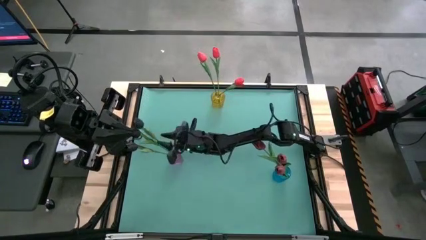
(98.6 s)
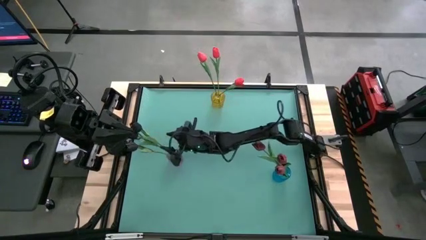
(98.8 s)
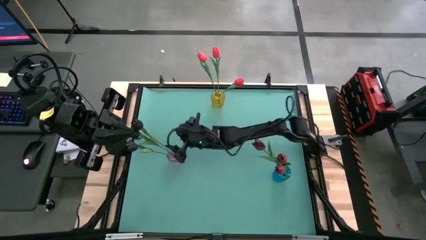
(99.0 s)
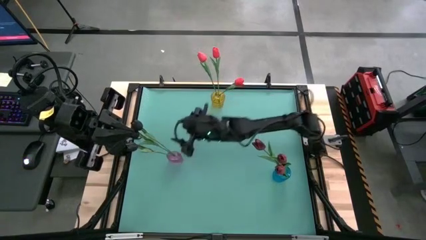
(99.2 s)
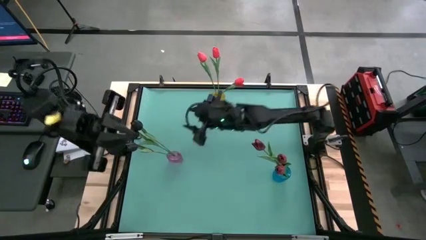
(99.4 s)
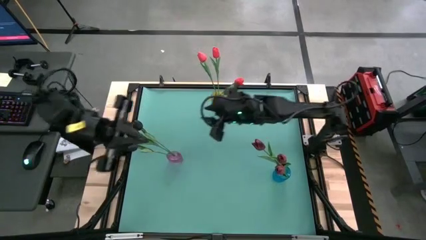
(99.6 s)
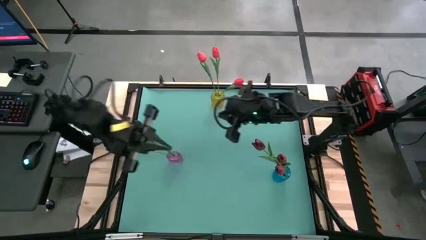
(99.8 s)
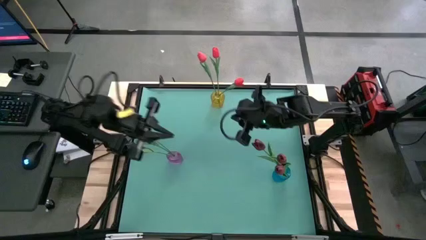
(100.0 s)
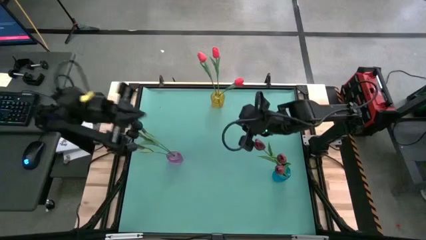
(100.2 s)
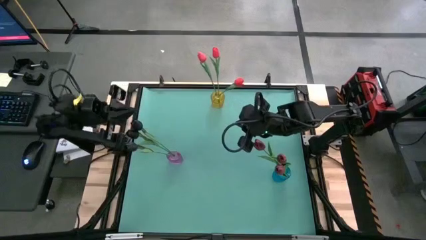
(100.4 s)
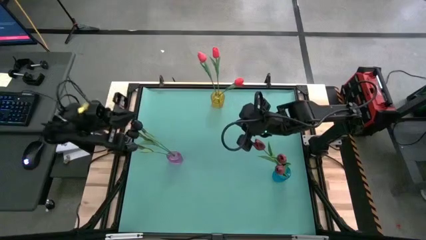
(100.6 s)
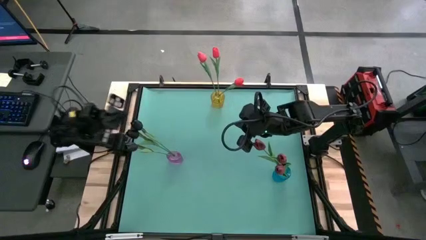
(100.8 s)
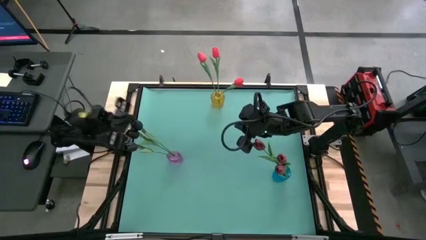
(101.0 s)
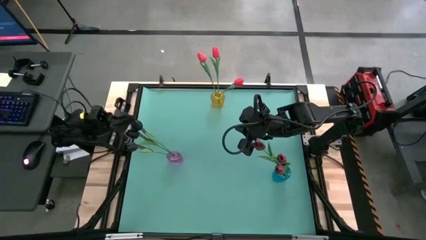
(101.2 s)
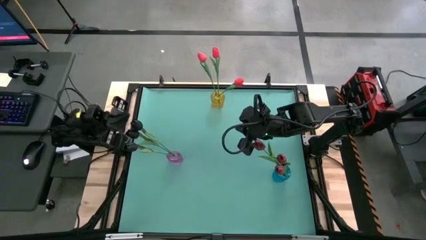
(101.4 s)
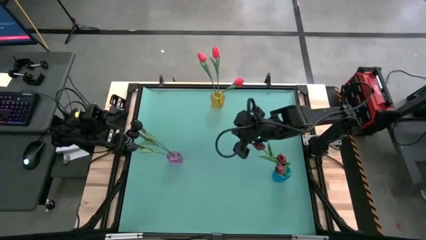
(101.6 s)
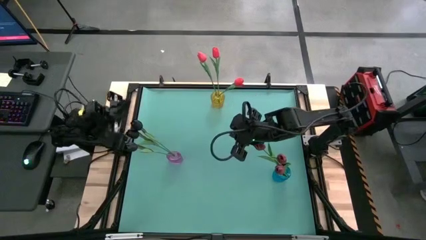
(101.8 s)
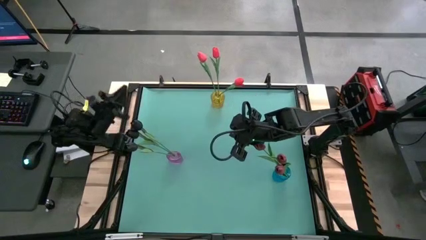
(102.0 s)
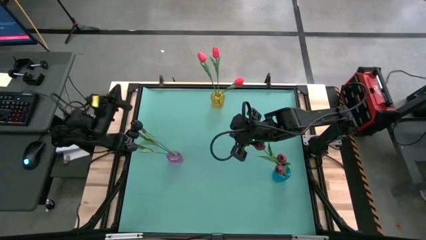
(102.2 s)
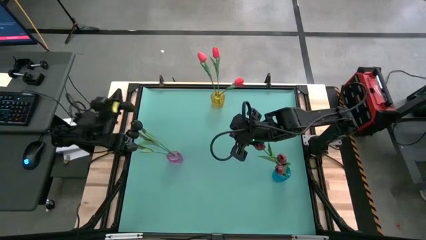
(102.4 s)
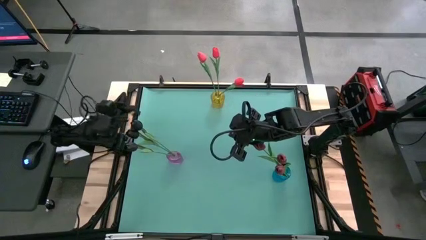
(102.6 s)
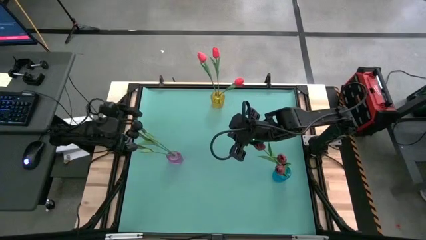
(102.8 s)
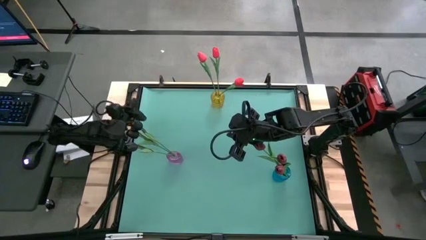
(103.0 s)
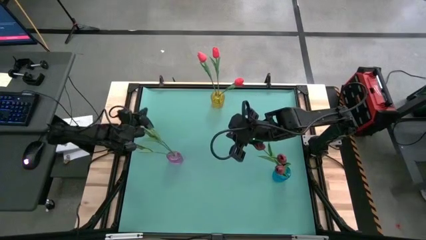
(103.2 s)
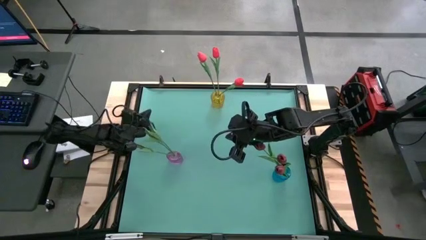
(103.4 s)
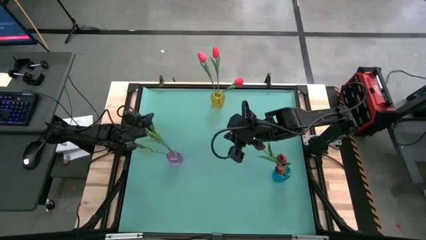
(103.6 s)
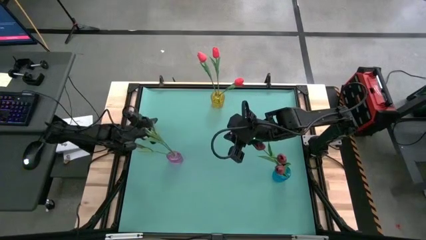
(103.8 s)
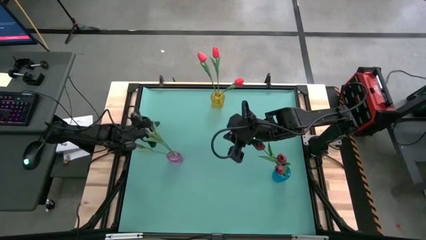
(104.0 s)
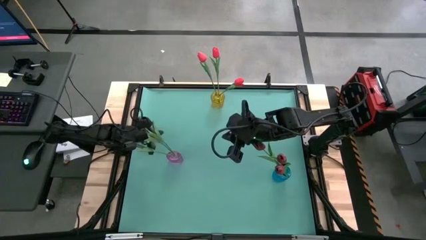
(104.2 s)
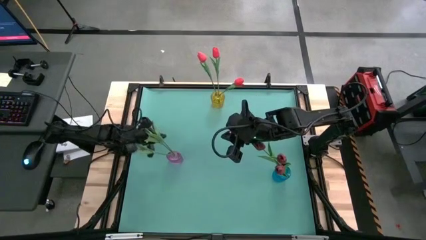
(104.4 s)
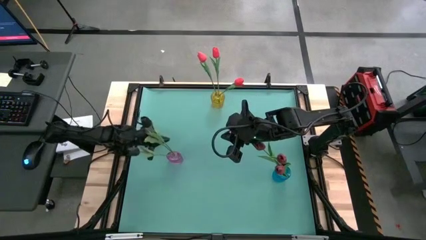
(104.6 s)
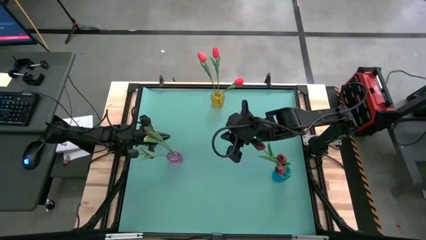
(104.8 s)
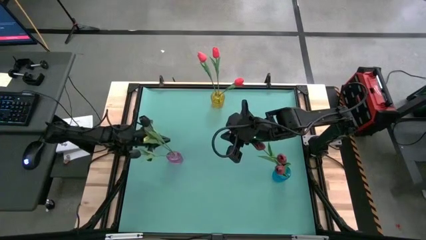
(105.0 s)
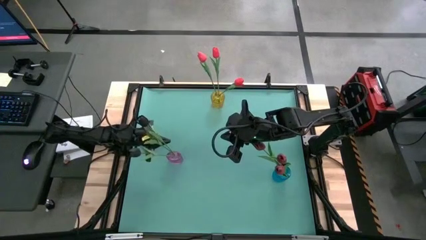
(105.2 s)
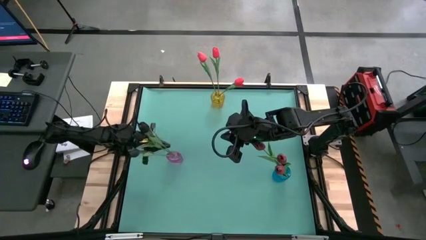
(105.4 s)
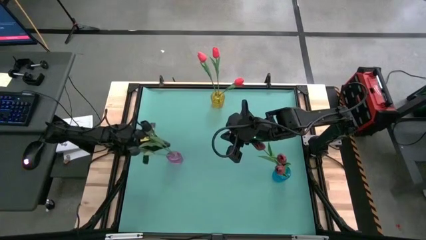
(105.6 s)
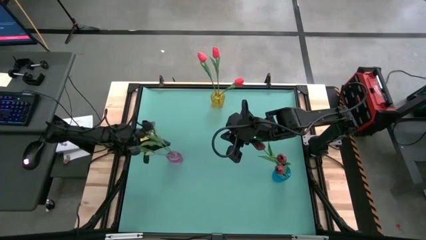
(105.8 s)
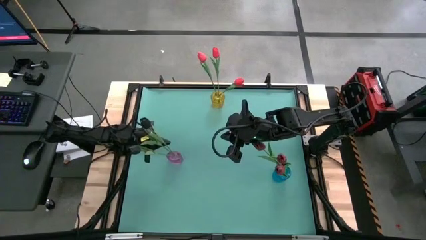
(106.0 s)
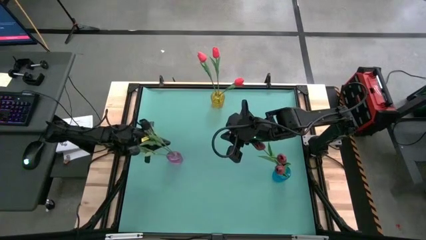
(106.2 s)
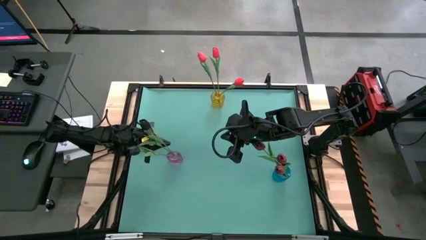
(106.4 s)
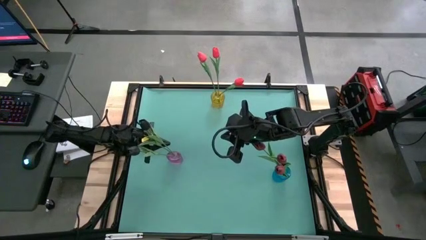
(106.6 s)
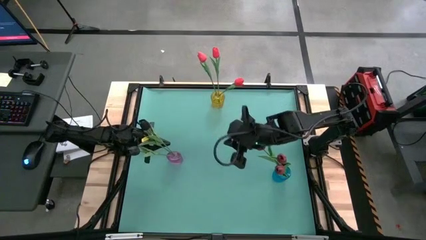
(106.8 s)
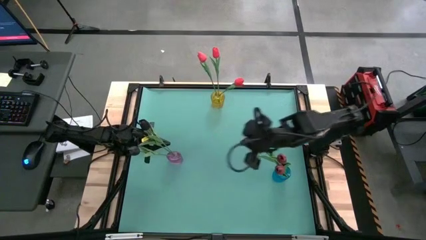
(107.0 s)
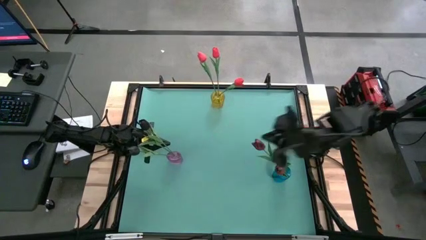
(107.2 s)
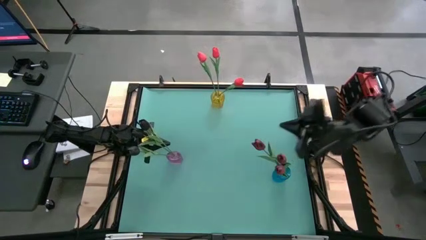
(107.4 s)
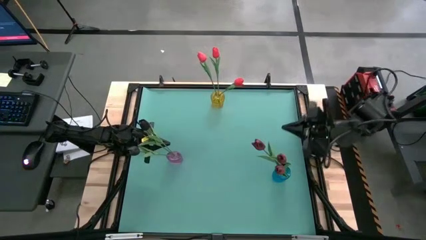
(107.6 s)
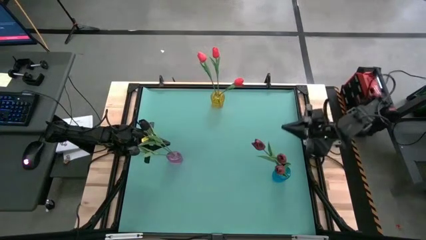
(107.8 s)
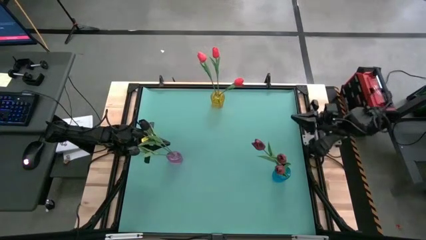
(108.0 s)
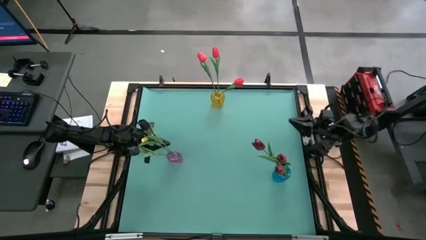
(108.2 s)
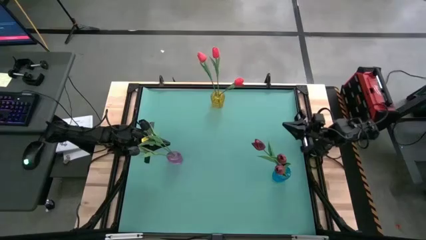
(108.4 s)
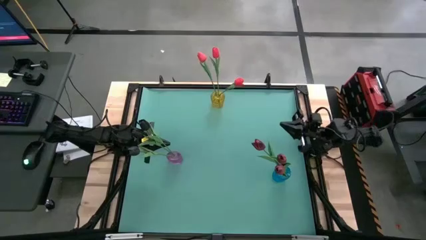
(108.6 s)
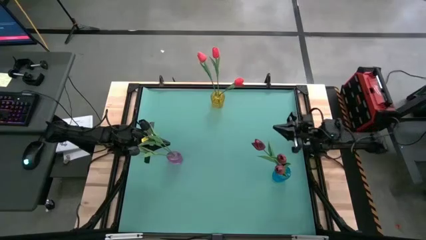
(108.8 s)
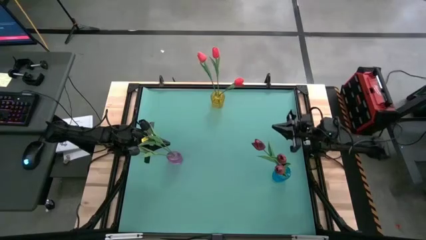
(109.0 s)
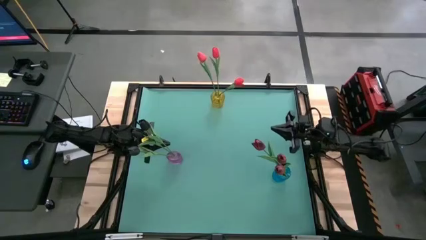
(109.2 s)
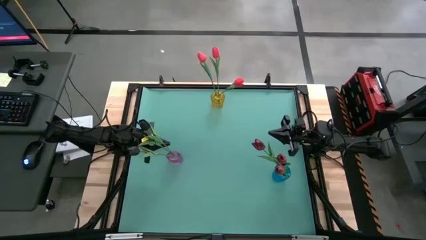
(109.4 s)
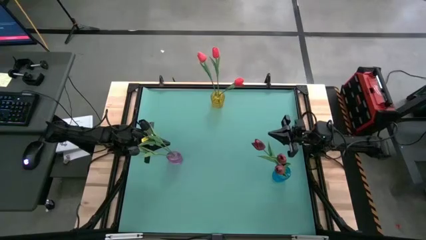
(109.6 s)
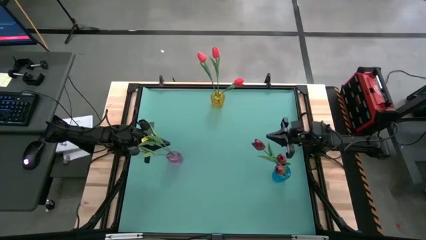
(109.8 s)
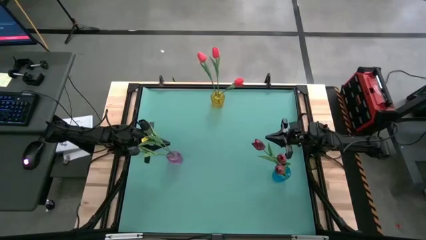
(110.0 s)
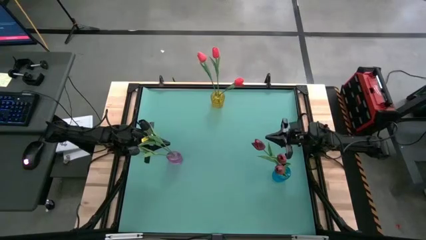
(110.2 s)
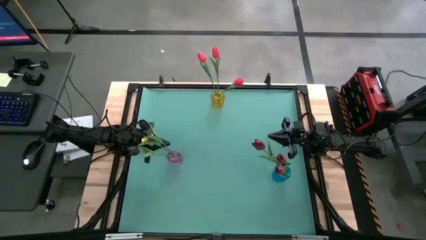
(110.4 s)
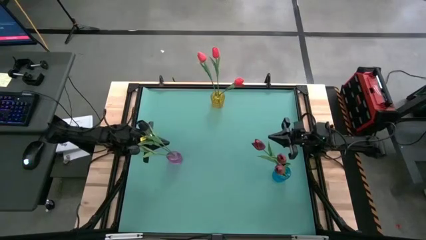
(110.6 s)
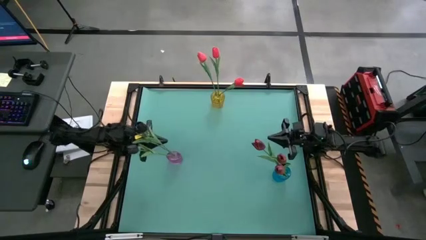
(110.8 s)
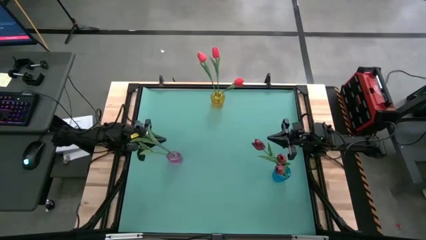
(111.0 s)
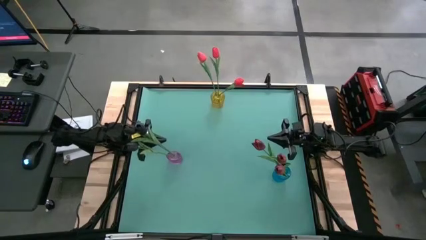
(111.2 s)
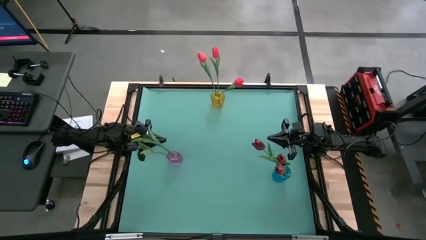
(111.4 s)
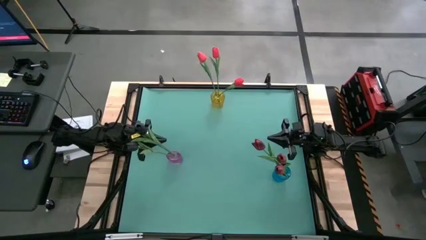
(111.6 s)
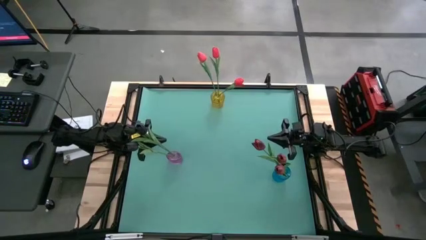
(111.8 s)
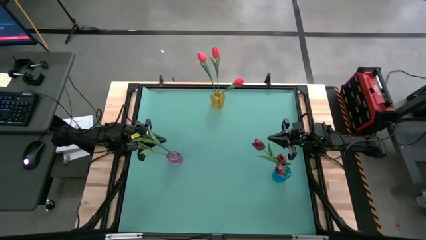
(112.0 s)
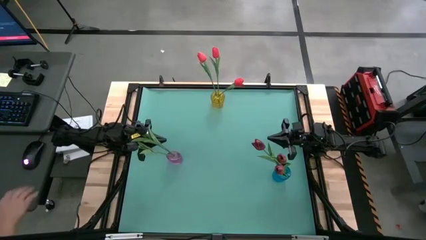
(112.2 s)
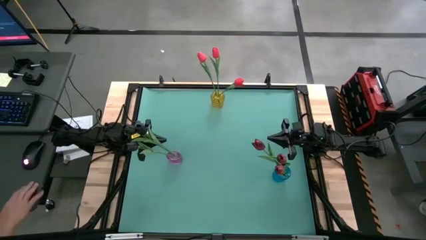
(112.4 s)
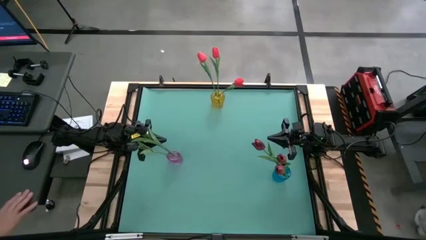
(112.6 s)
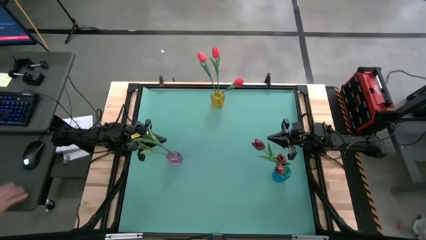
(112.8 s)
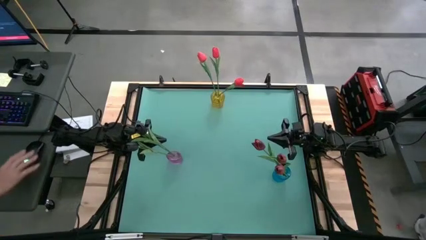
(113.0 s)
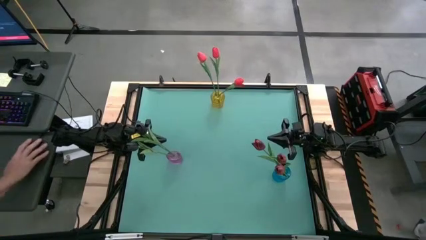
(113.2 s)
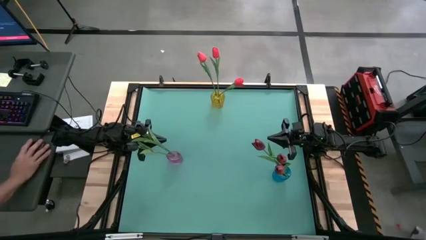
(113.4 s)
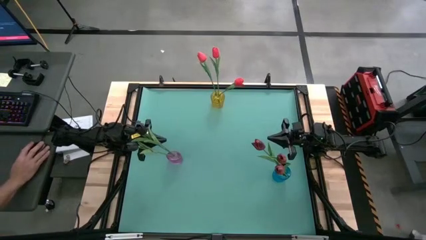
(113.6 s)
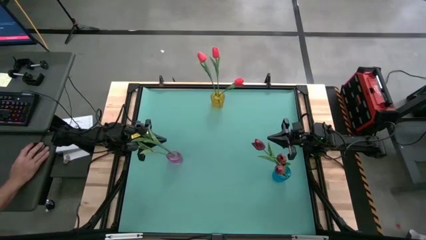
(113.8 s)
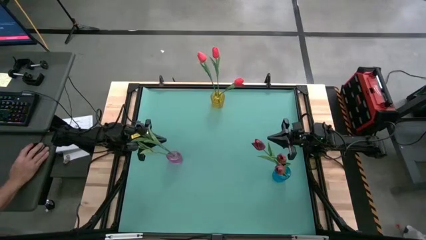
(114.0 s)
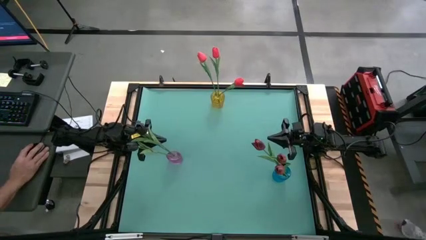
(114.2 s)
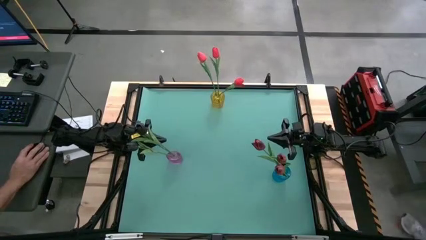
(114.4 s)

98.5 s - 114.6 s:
Task: Sort flowers into vase by color
Return to Home Position
